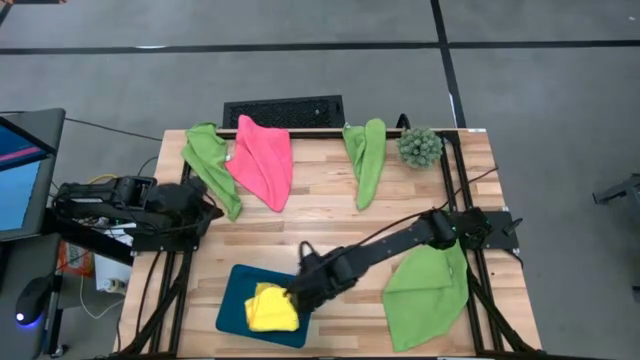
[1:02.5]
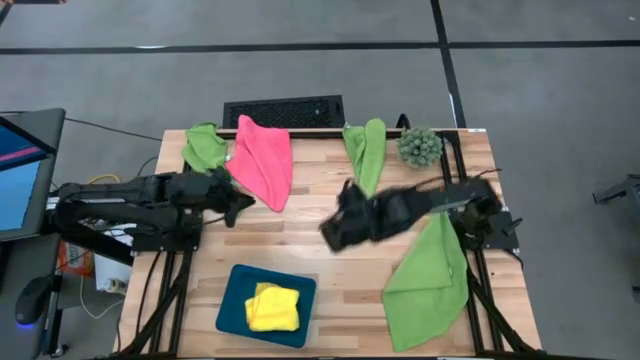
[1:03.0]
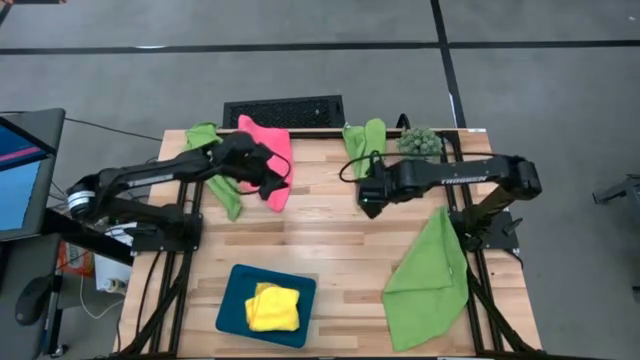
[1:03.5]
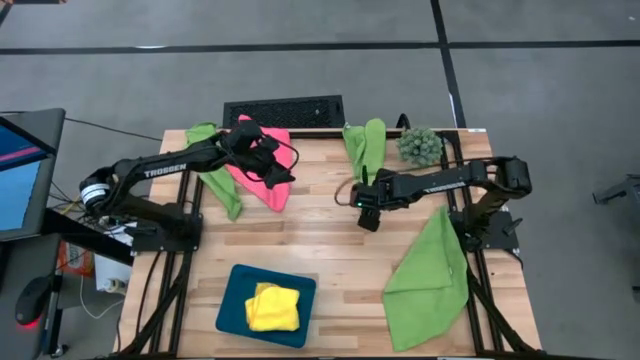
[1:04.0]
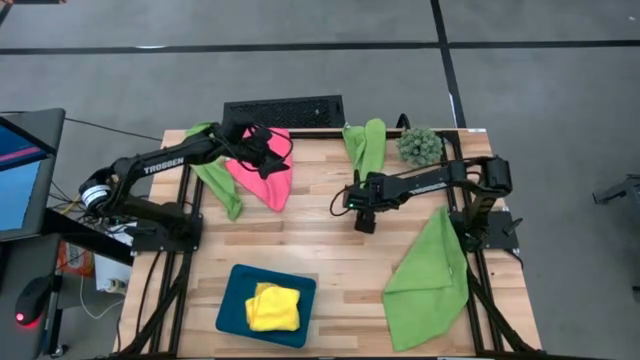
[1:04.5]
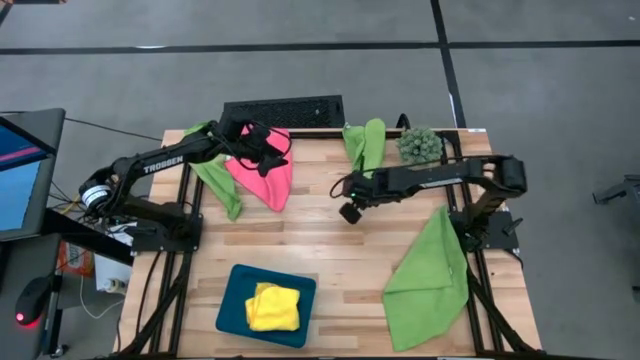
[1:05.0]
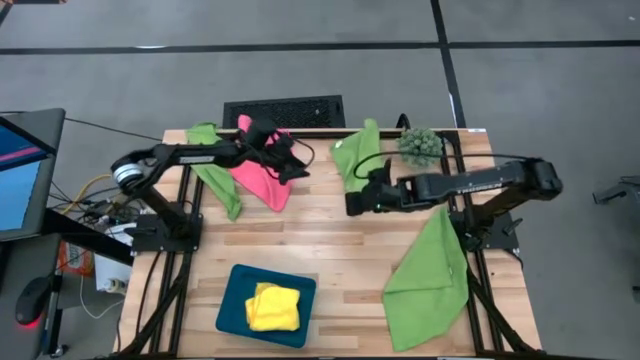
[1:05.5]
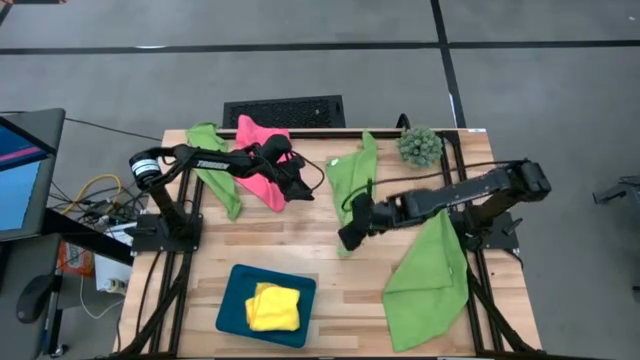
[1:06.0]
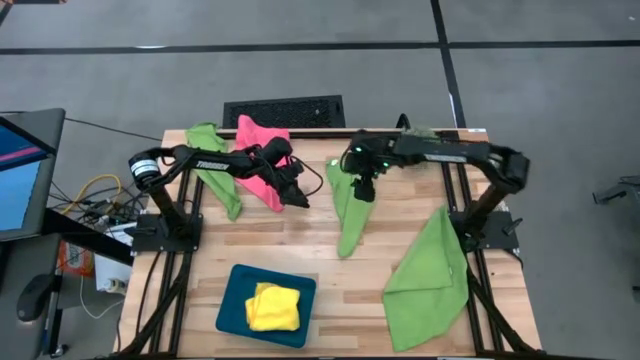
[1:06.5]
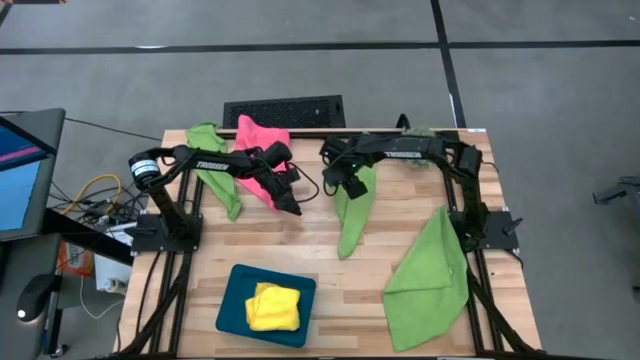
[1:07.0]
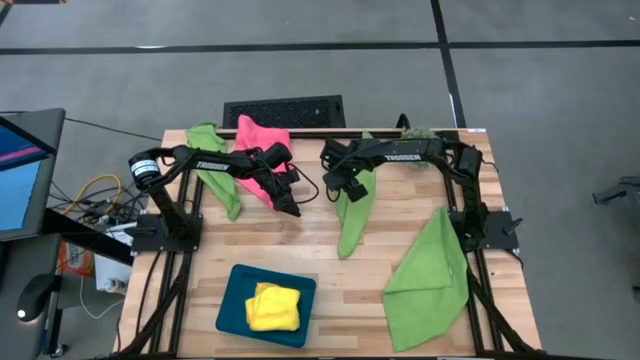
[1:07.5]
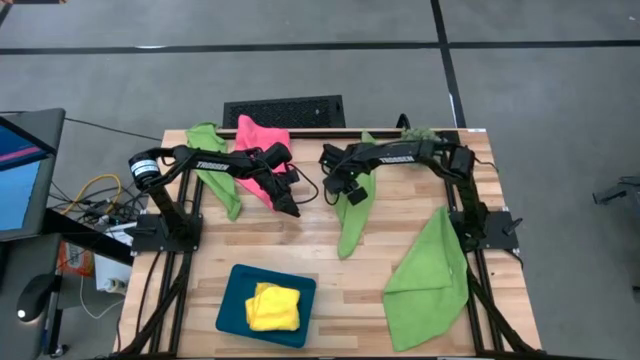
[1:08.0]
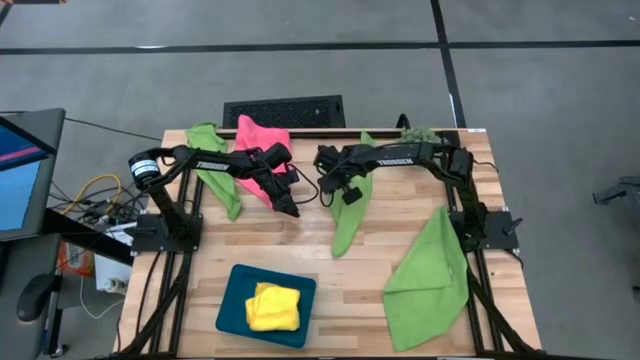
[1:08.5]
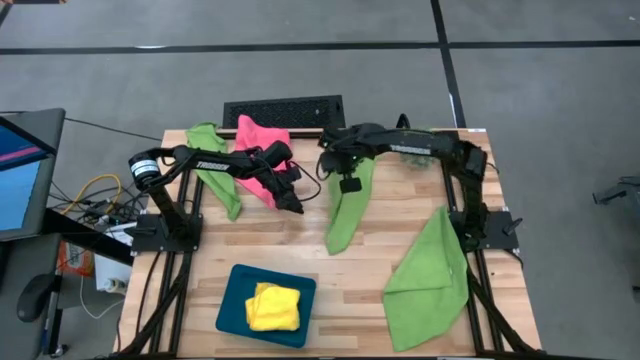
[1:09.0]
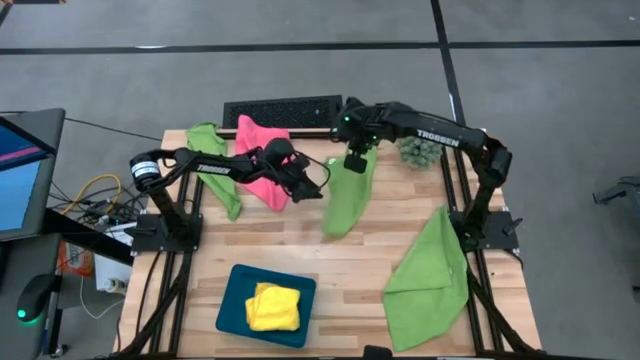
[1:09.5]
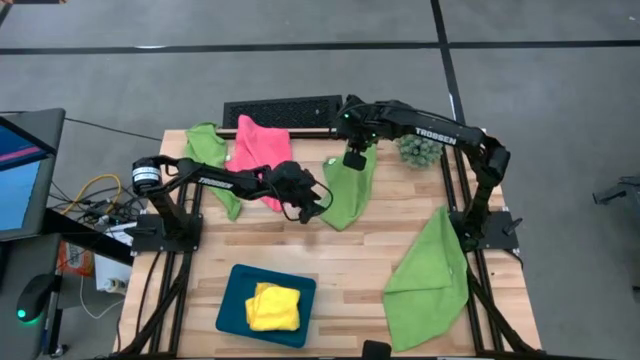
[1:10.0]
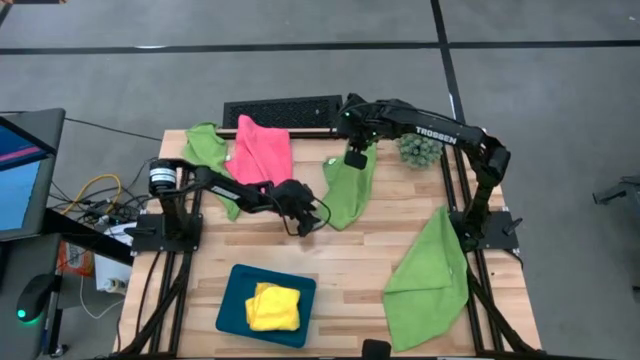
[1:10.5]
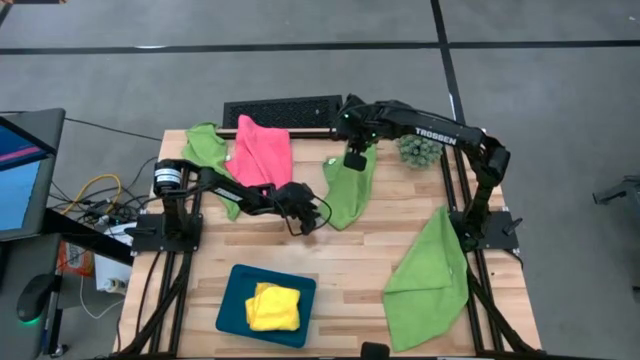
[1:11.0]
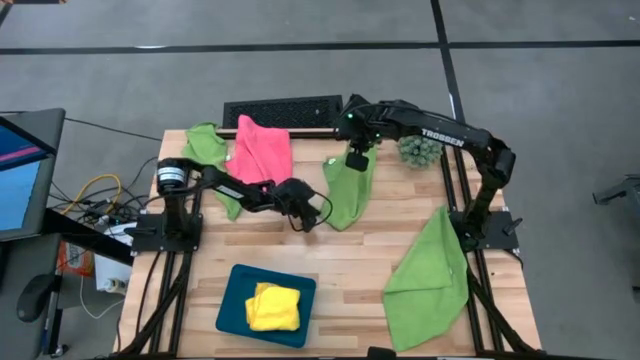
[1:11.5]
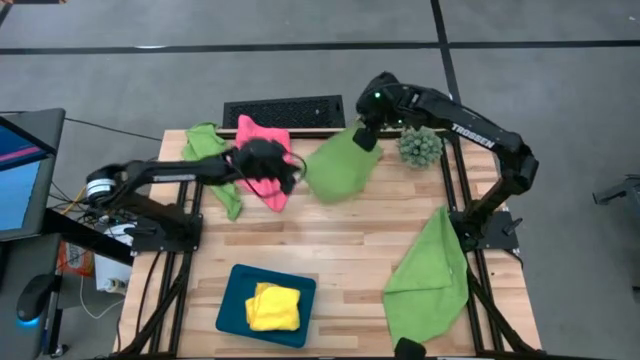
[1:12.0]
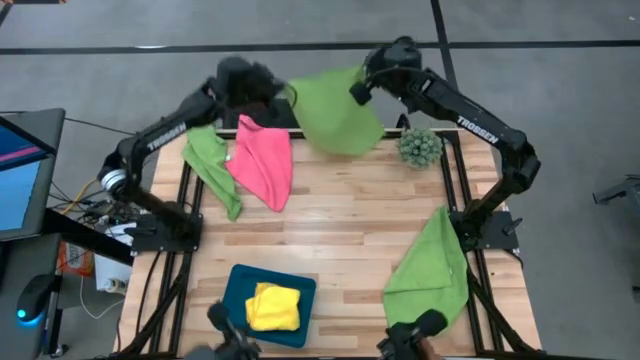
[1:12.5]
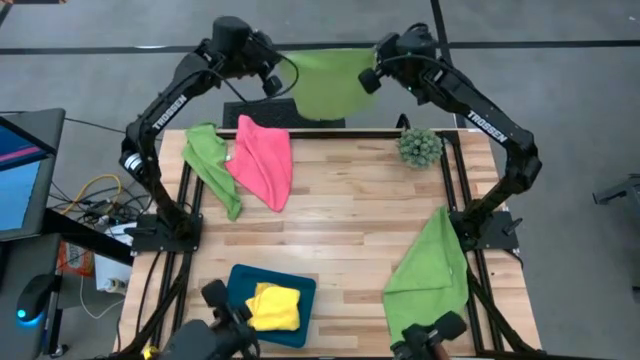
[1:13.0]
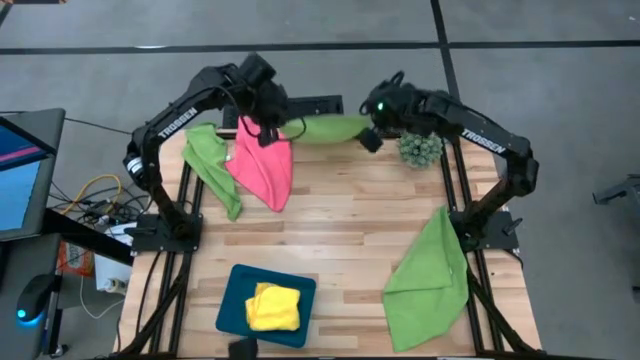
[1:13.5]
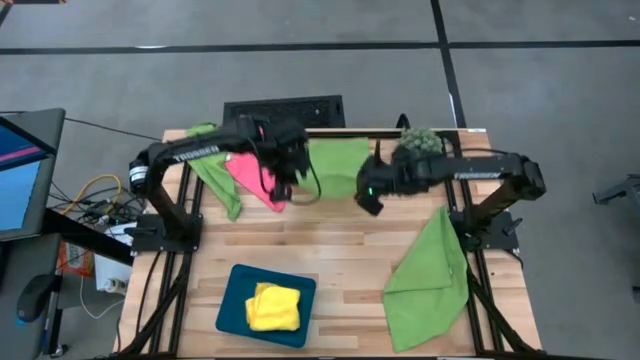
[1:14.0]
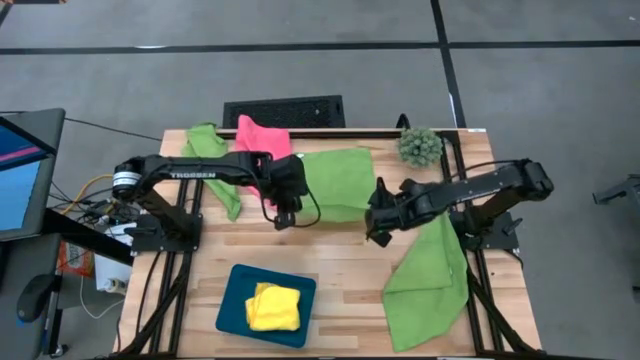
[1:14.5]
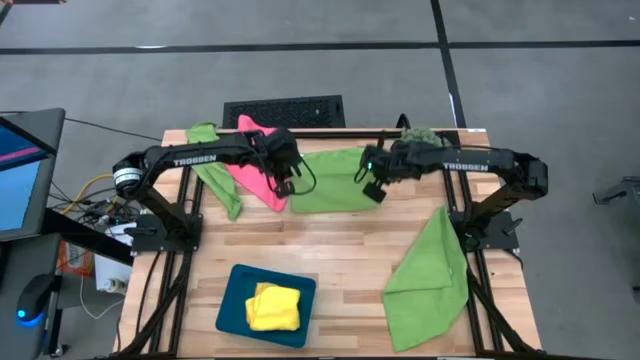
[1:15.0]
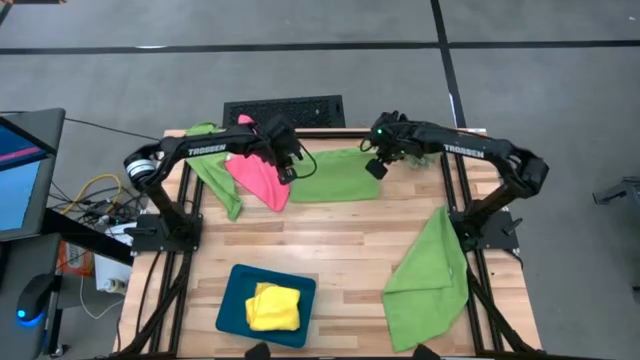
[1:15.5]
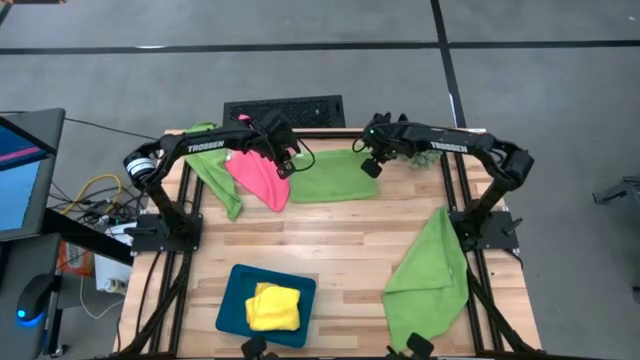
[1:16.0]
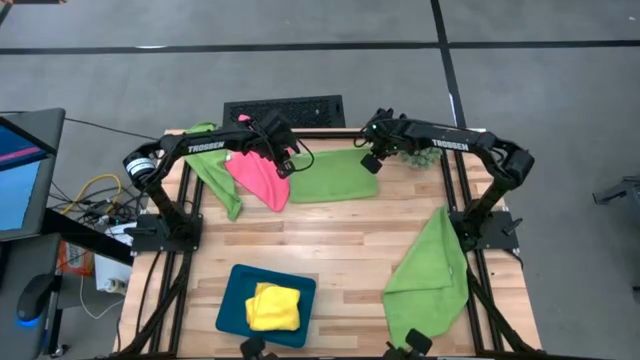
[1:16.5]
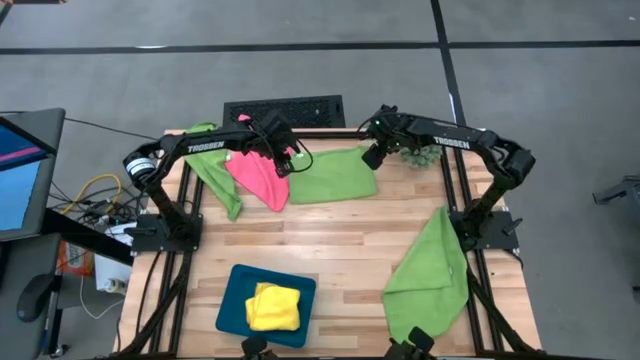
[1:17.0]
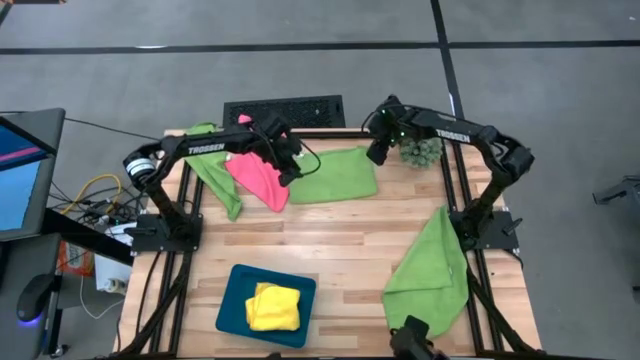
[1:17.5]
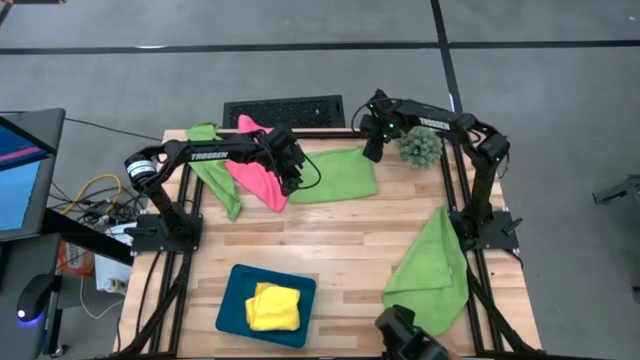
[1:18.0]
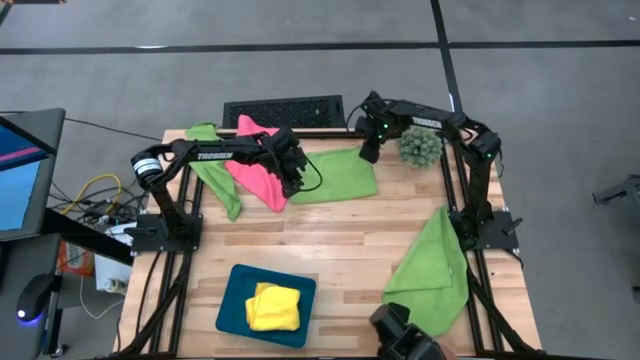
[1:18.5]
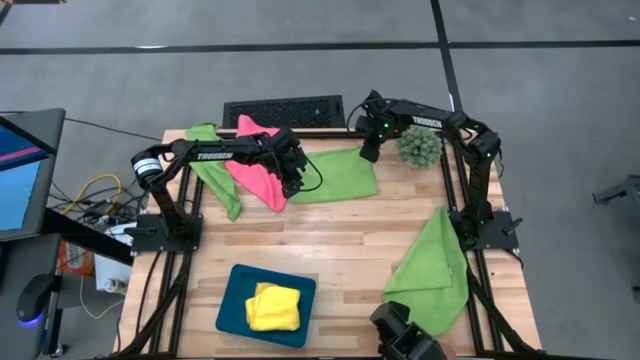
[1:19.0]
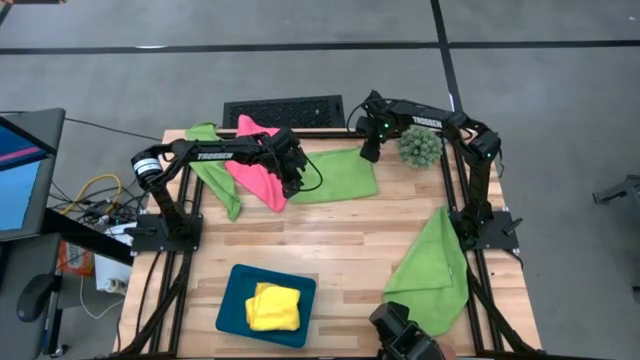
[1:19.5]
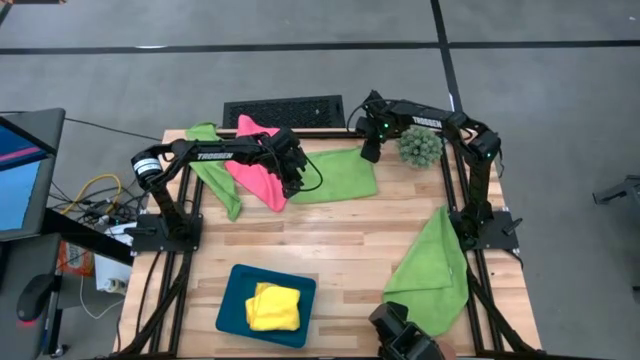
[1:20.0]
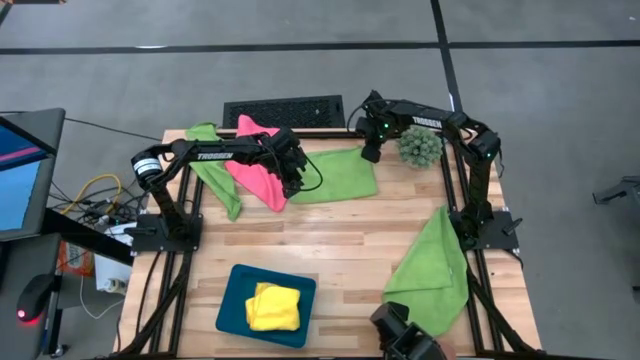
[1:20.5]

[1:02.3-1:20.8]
Task: Fold microfiber towels
Fold the top right green microfiber towel

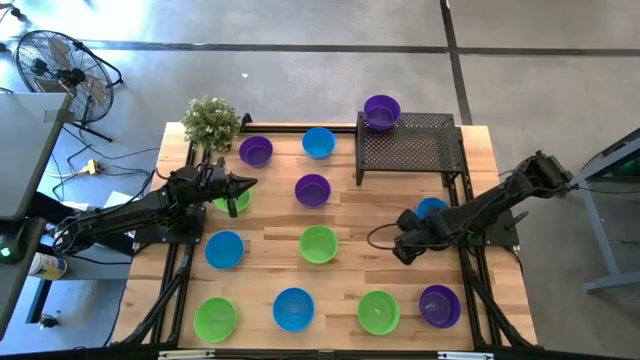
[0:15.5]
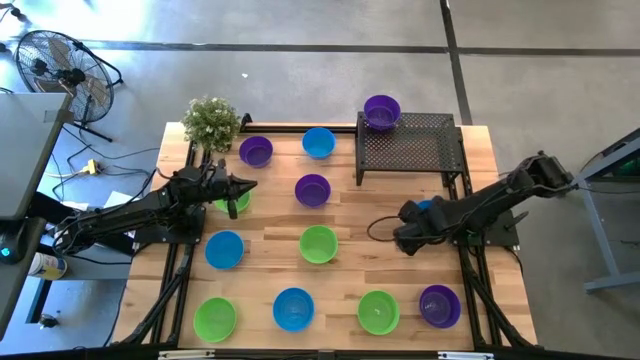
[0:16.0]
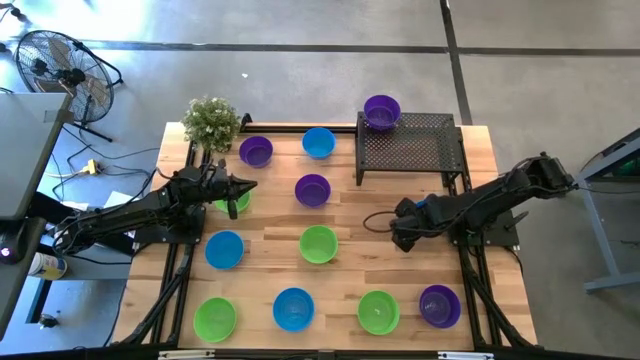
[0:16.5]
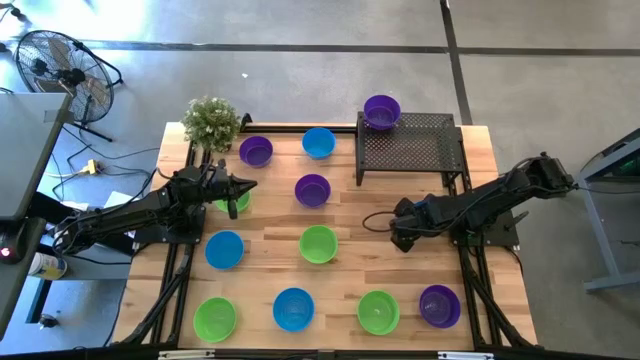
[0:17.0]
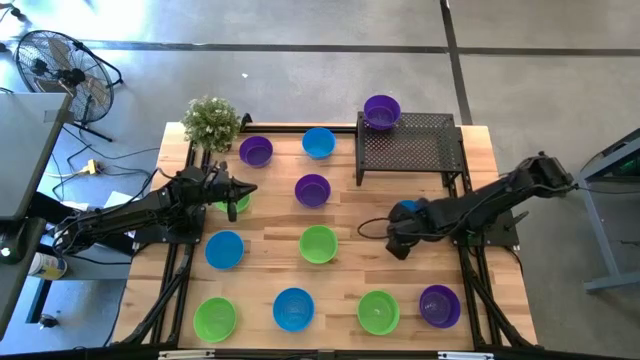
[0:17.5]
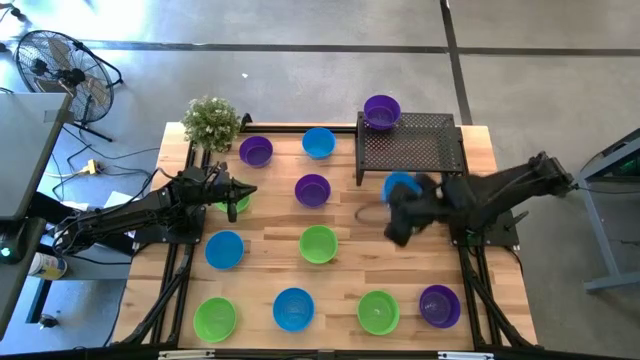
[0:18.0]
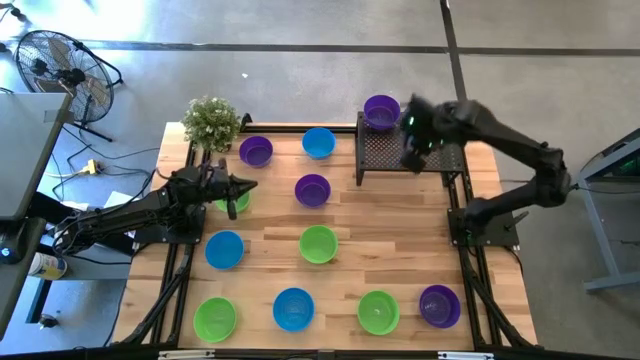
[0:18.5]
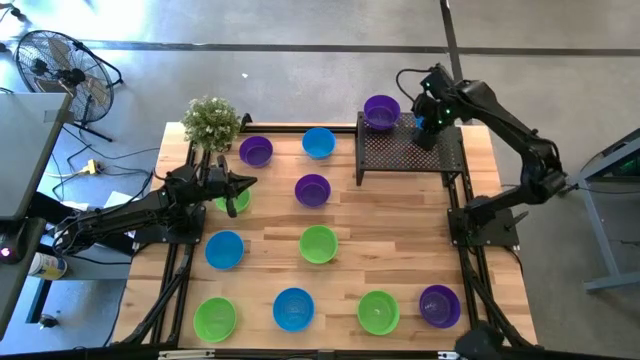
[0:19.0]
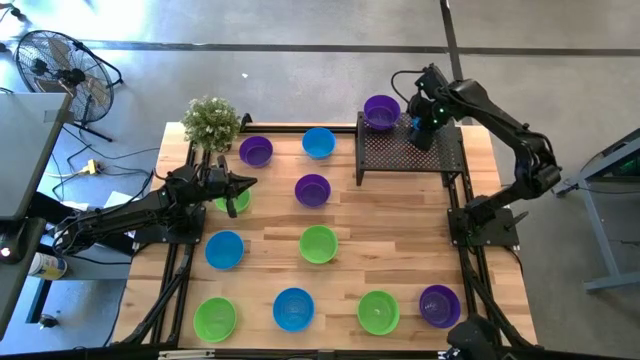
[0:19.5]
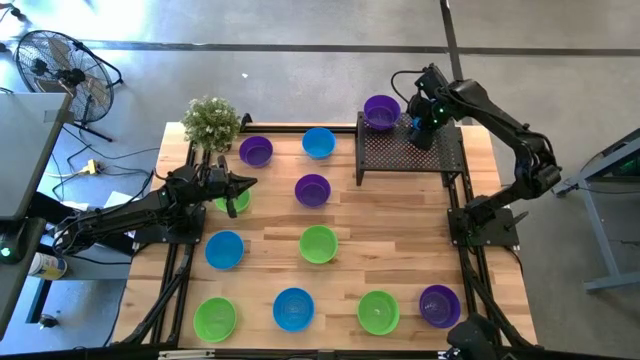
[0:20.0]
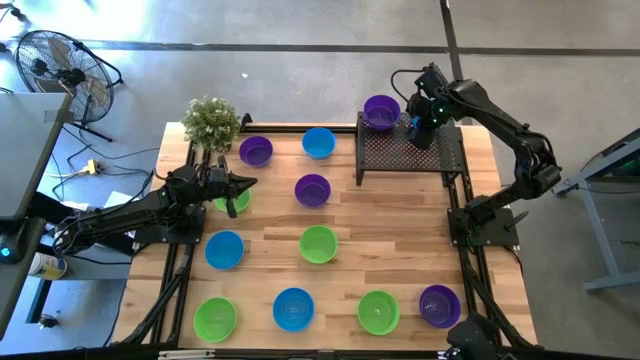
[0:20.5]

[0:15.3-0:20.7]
Task: Pick & Place Mini bowls
Put the blue bowl on the shelf
